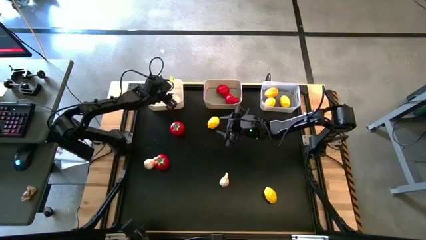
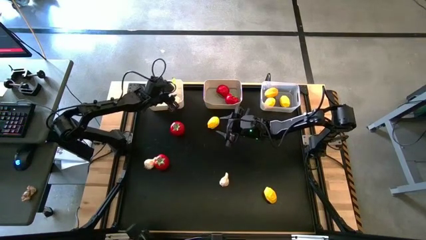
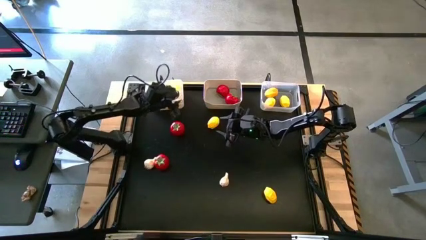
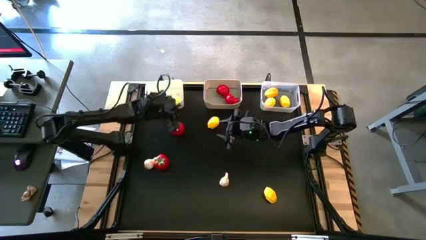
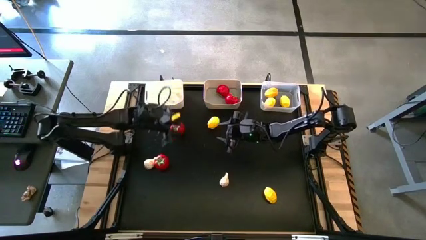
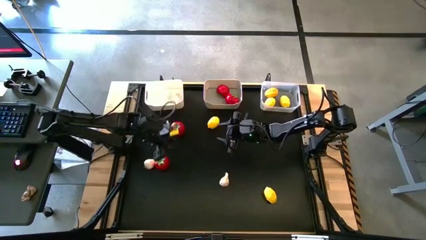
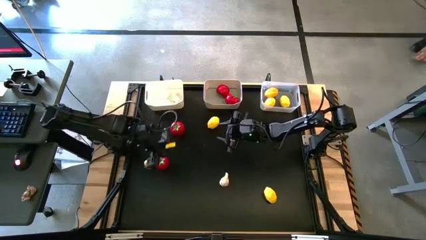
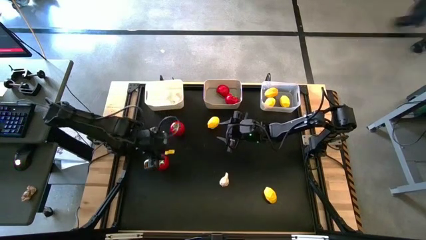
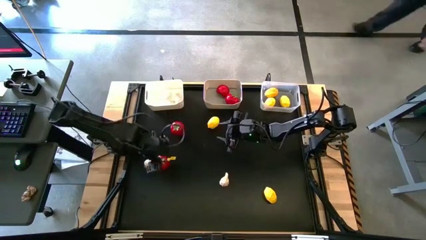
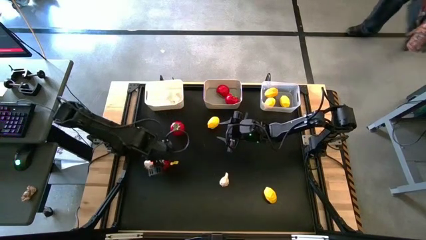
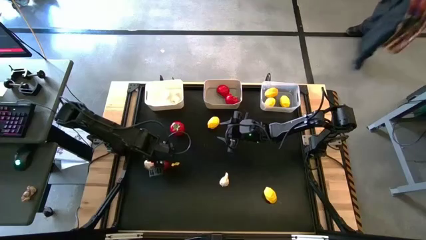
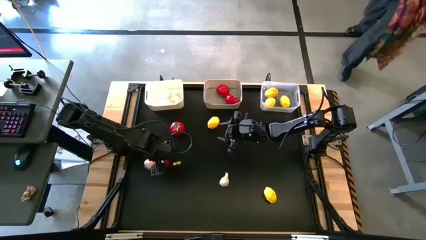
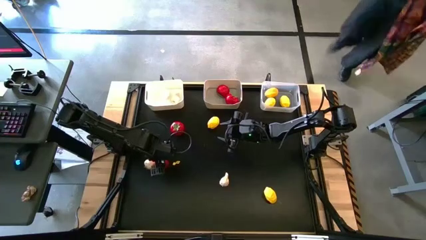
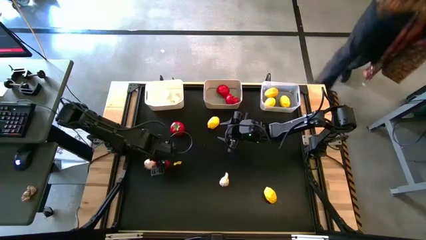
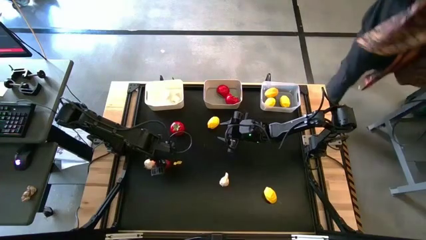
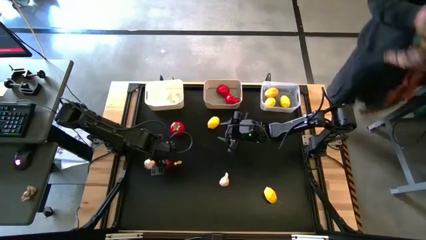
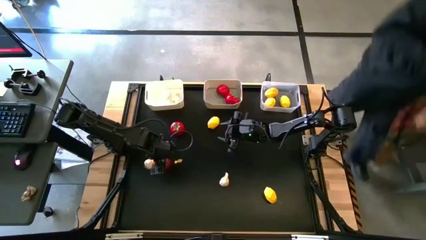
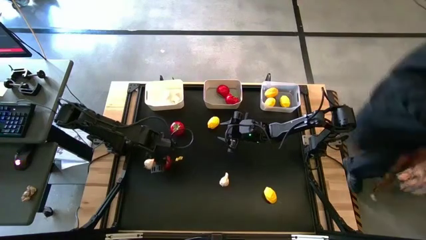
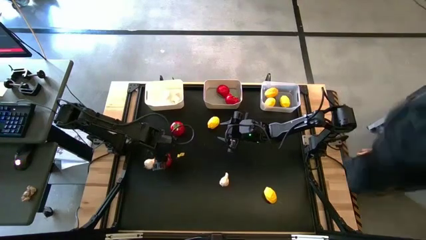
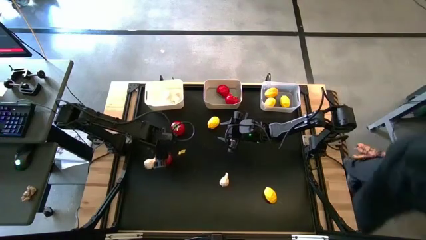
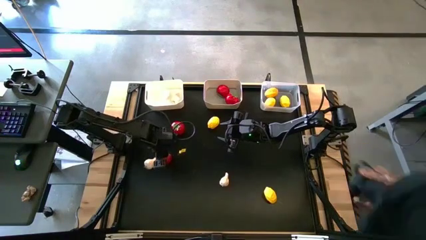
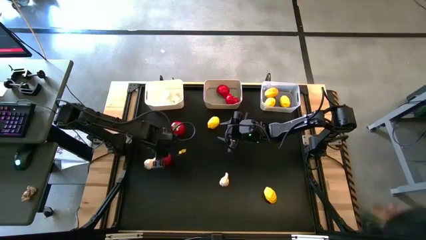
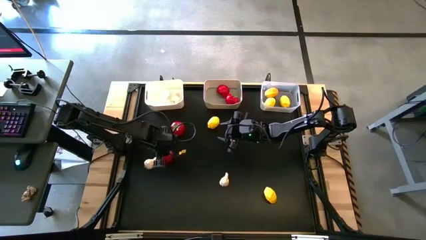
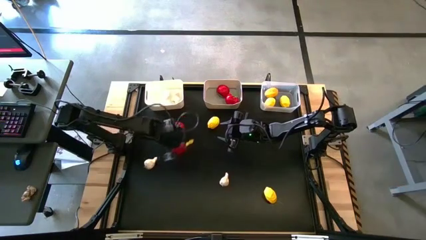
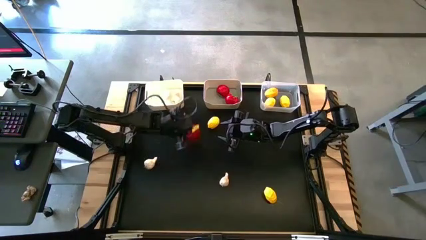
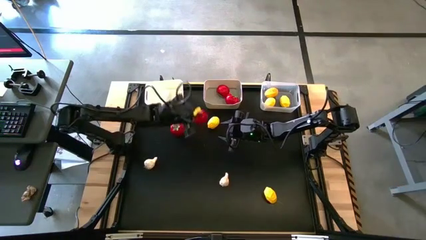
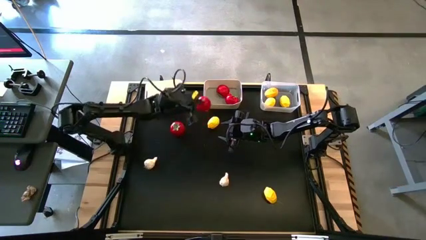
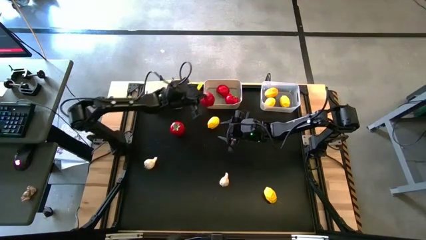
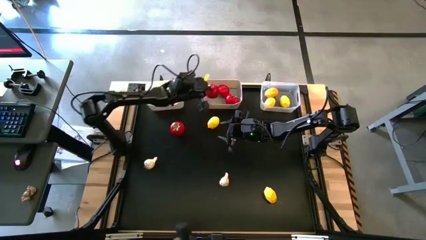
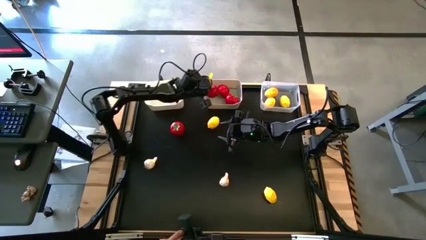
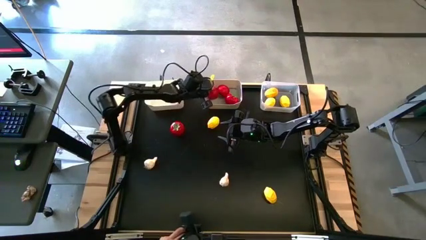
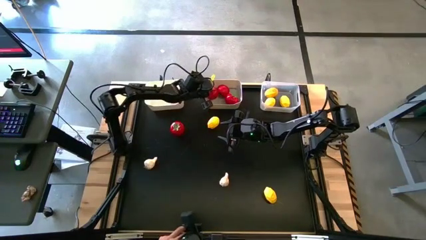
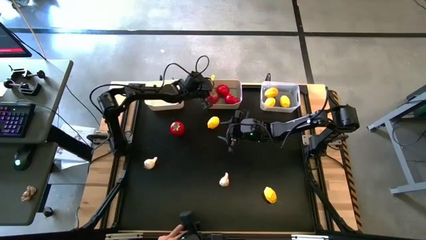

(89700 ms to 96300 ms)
Task: Sort produce into baskets
Put the bottom tomato into the gray bin

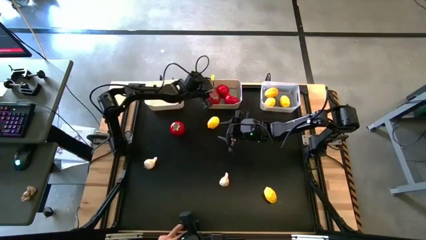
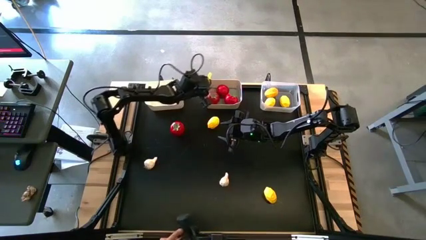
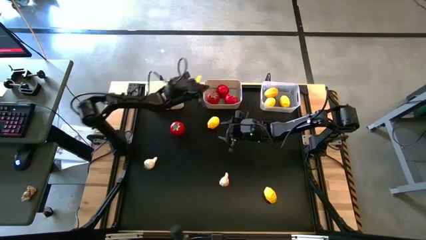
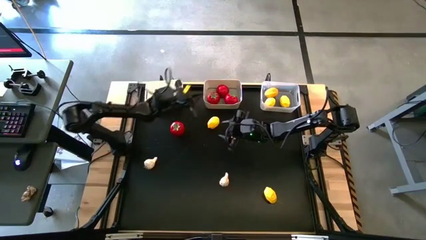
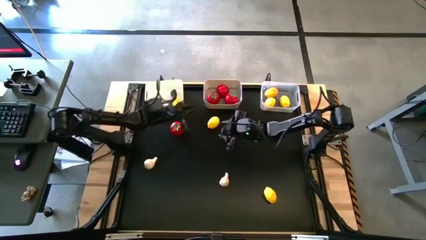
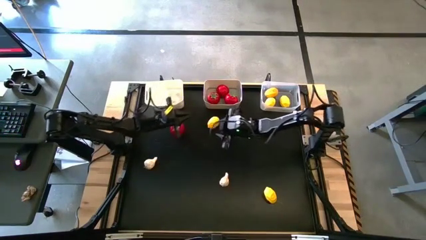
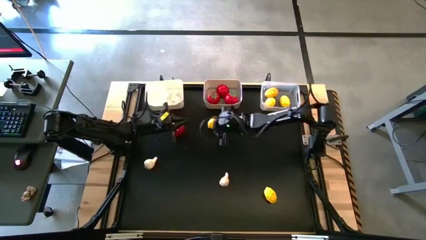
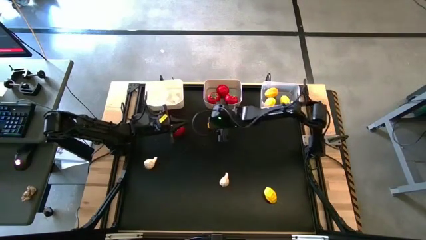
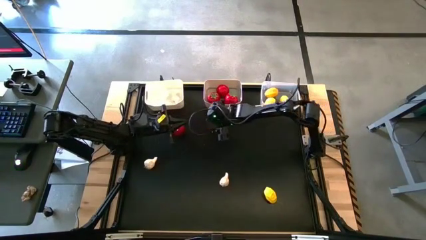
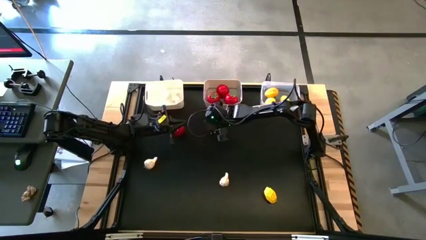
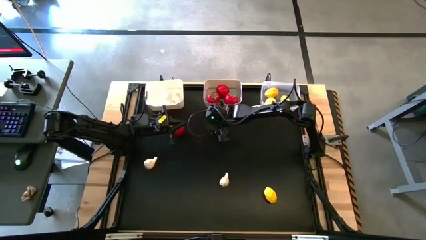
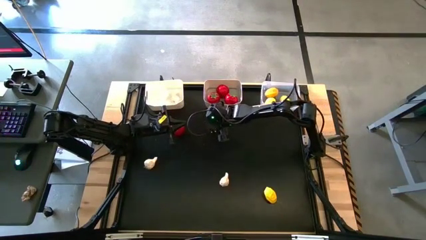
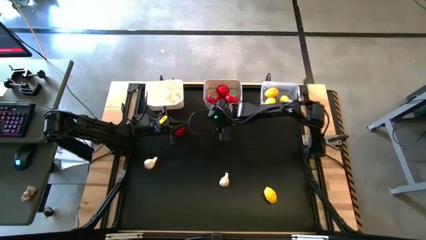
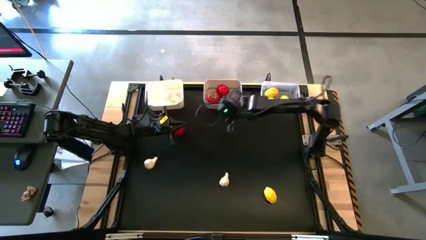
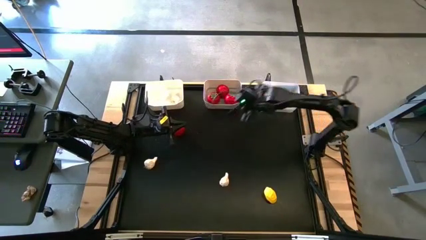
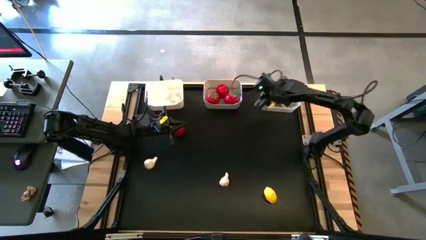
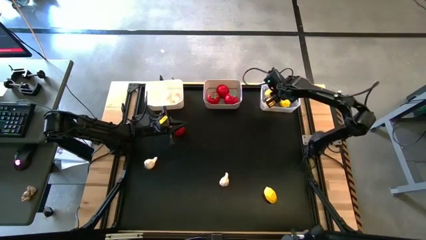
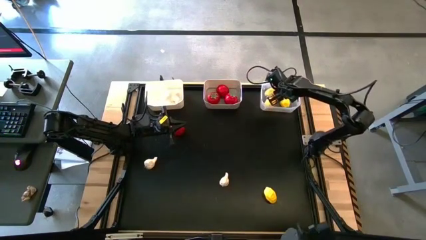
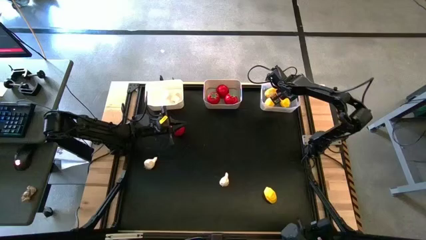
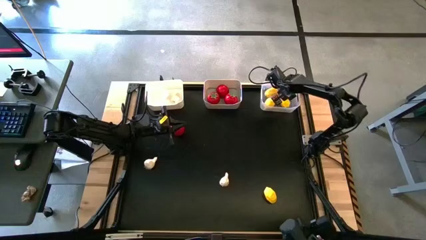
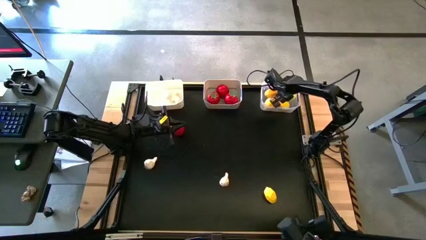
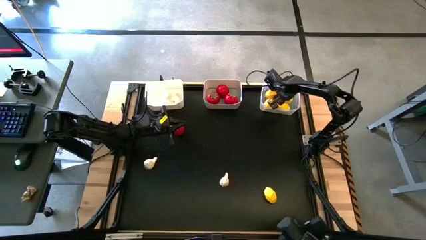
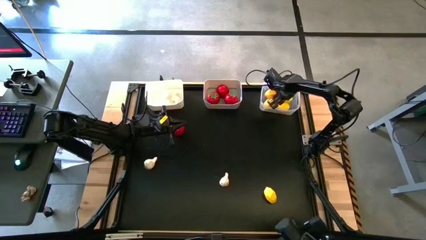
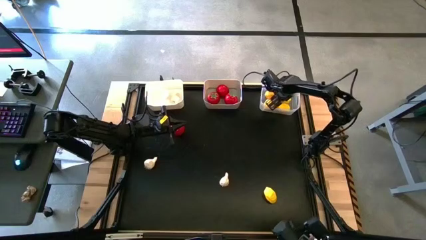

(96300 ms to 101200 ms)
Put the top lemon into the transparent bin

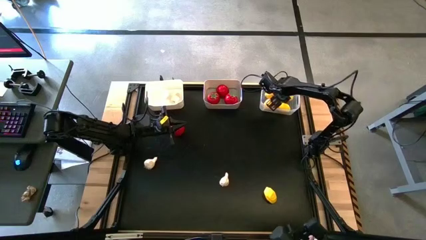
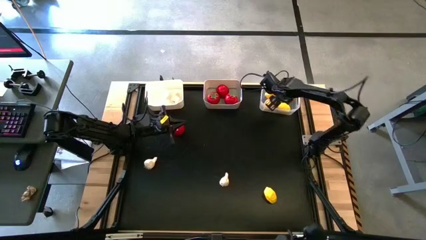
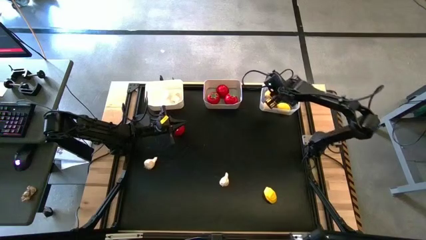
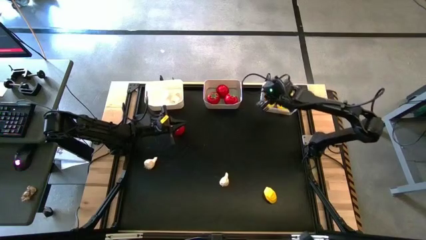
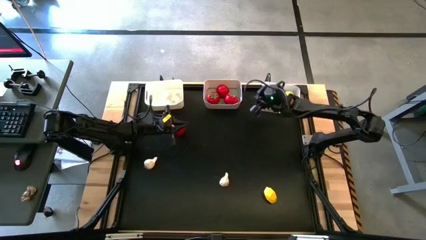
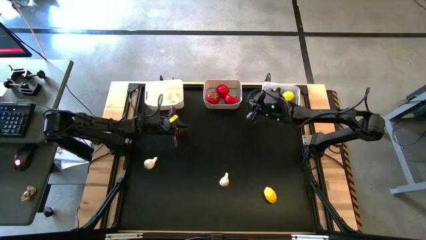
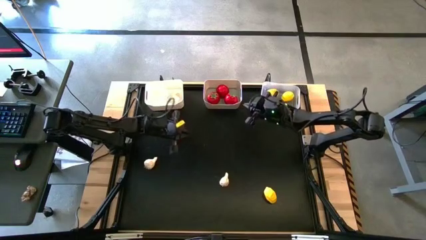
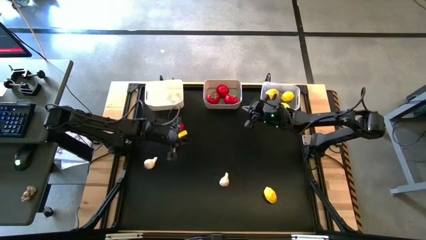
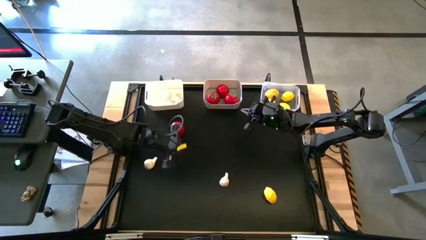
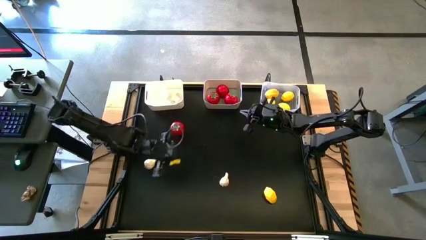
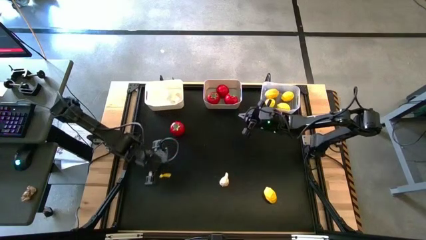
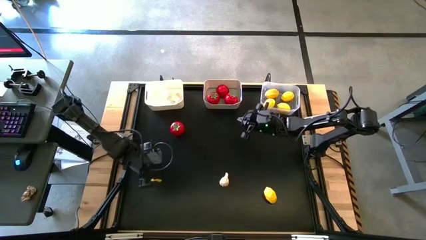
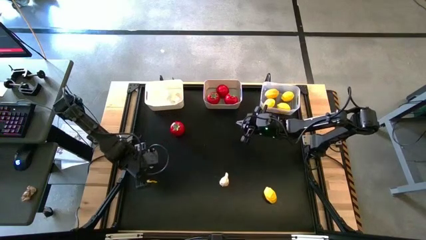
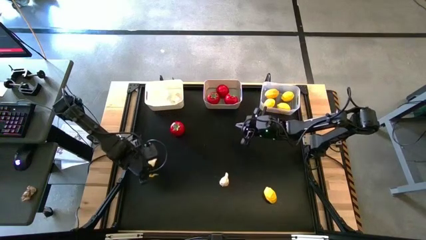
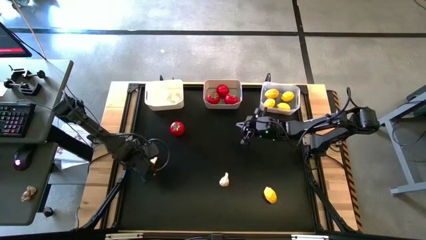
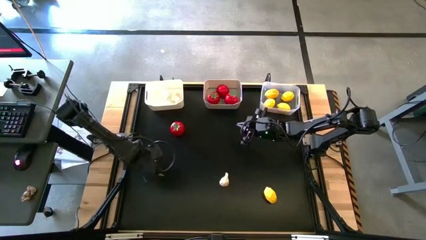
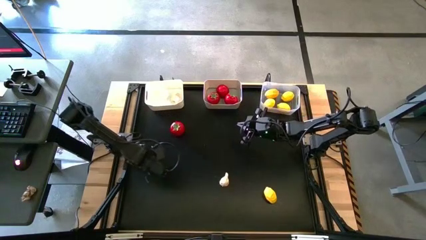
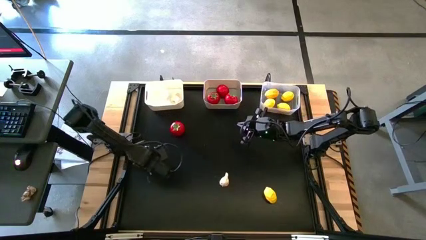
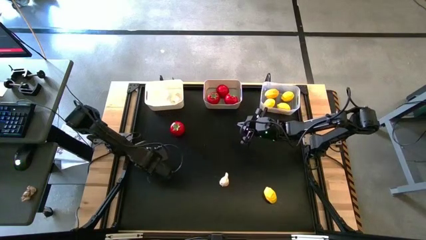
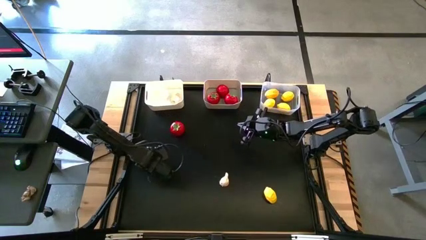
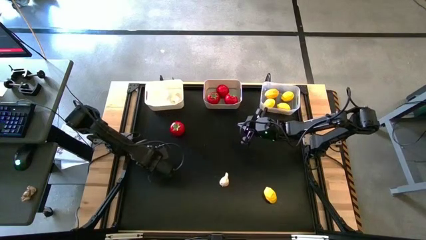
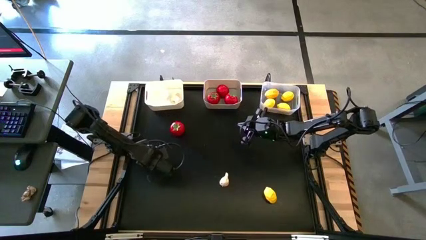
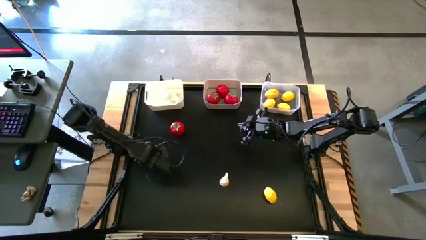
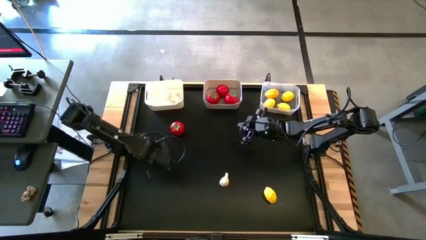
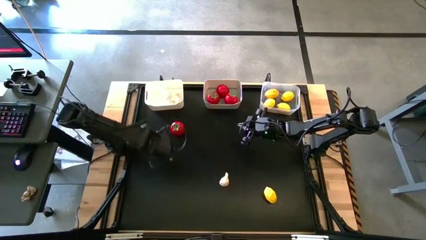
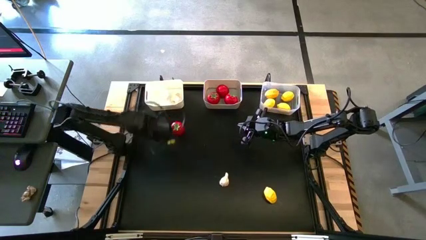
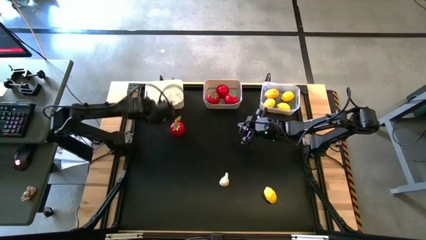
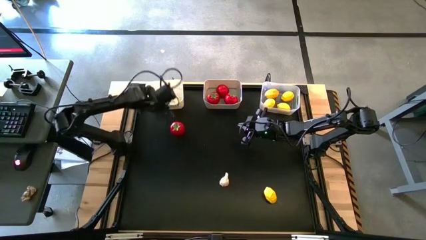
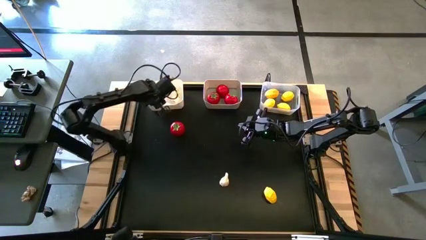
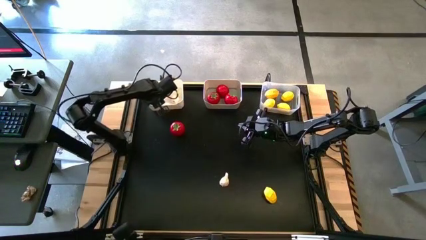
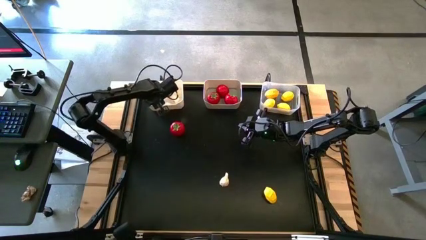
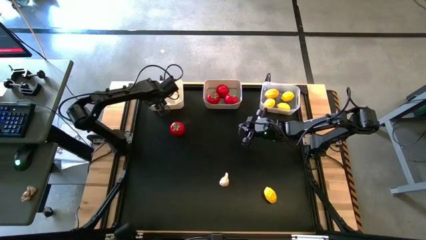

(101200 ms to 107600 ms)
Put the left garlic into the white bin
